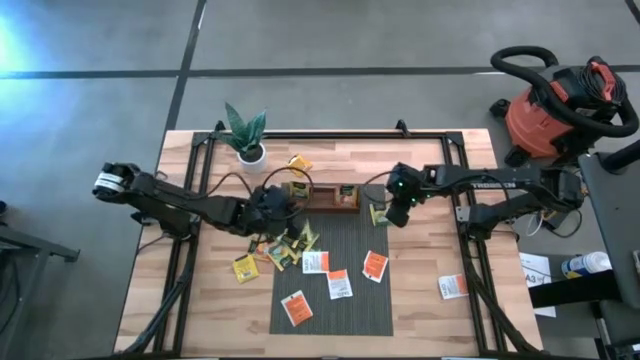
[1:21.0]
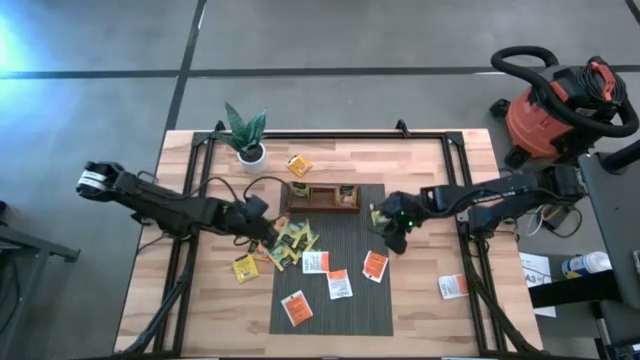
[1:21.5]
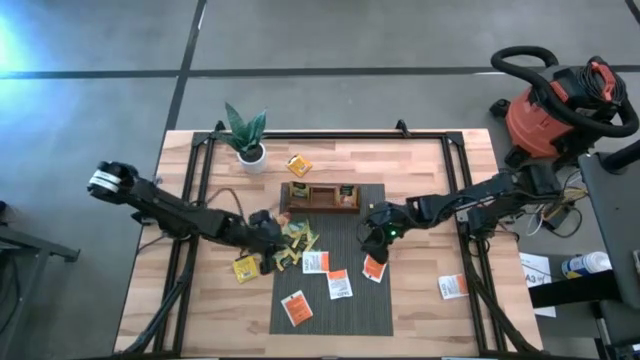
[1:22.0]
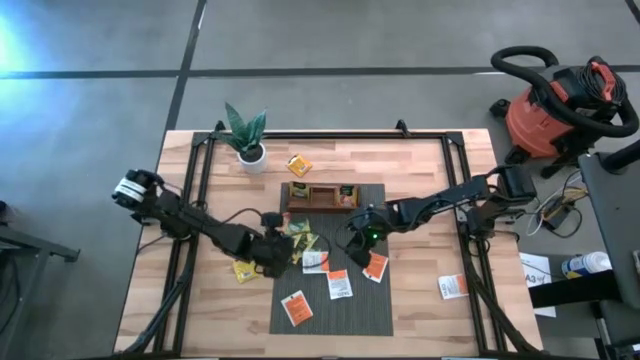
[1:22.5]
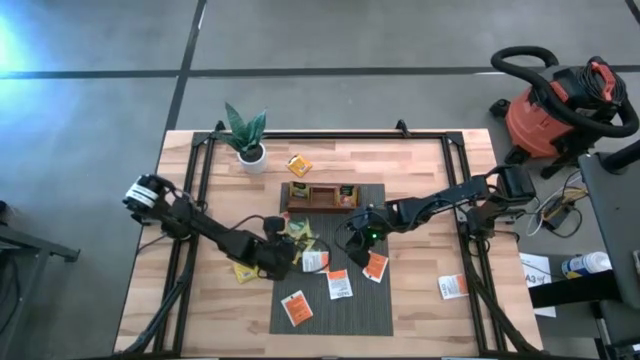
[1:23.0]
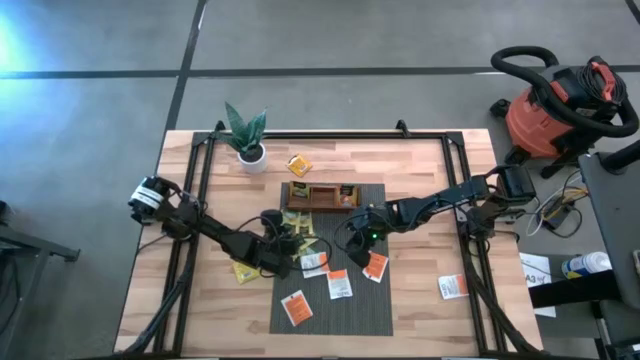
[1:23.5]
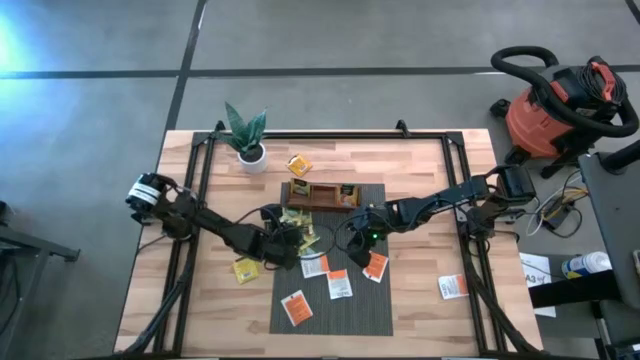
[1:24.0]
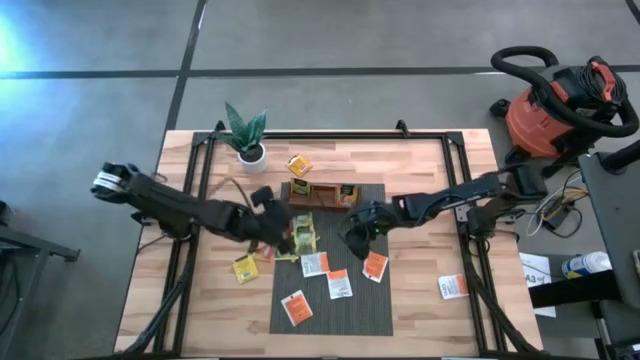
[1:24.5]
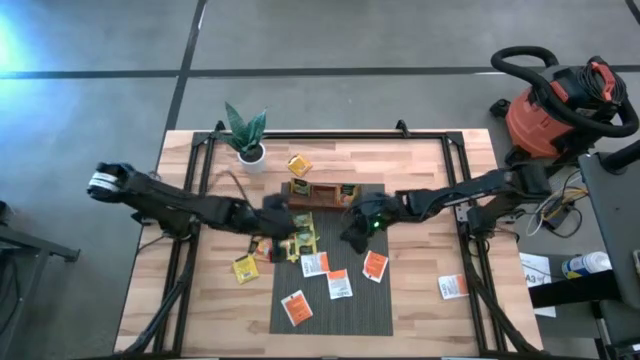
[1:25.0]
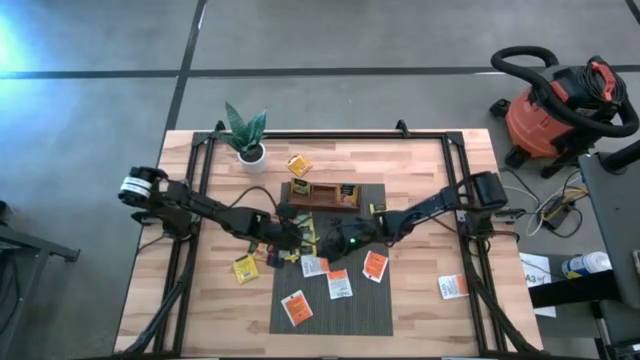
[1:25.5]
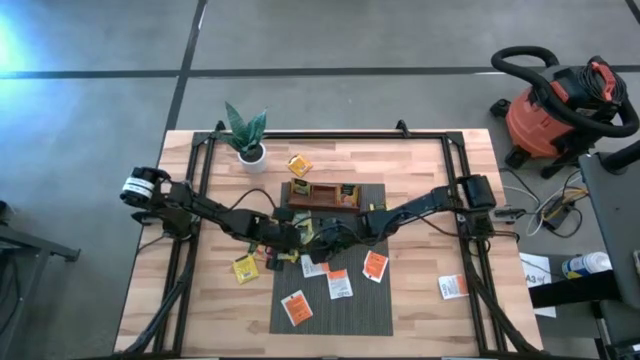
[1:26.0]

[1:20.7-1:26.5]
Task: Pick & Place Tea
Put the yellow tea bag into the left compartment of the wooden organizer

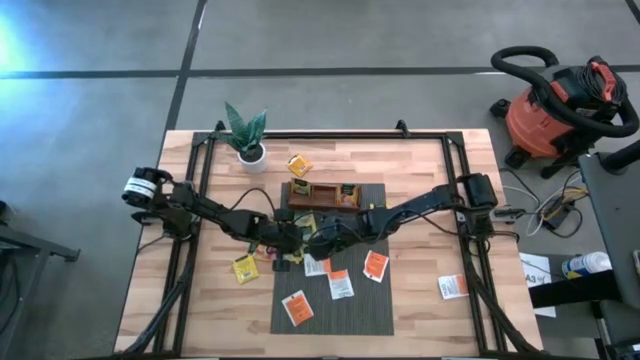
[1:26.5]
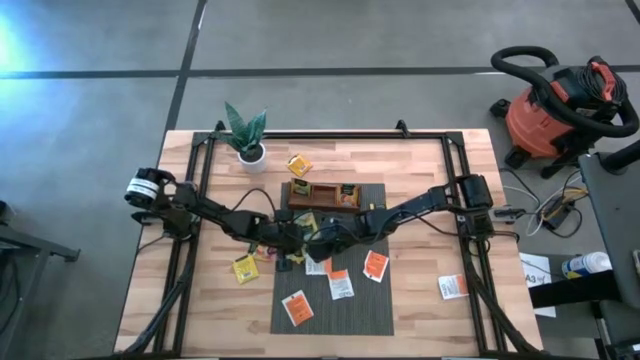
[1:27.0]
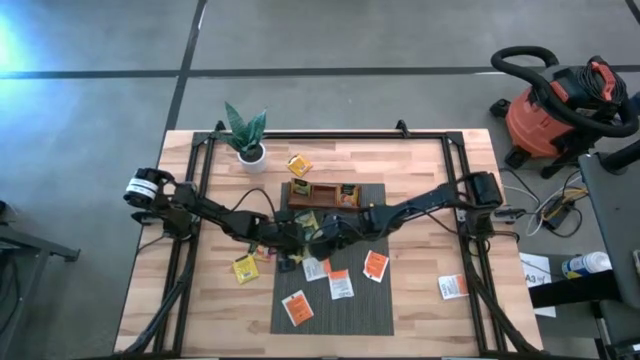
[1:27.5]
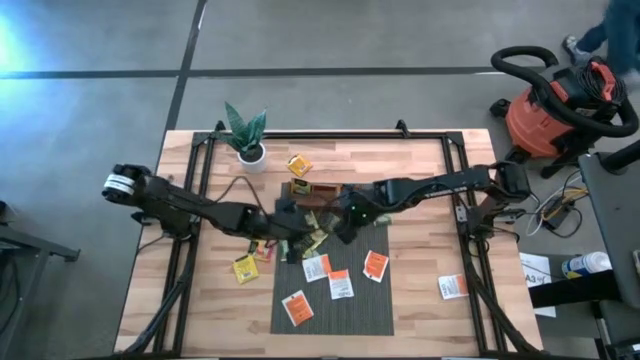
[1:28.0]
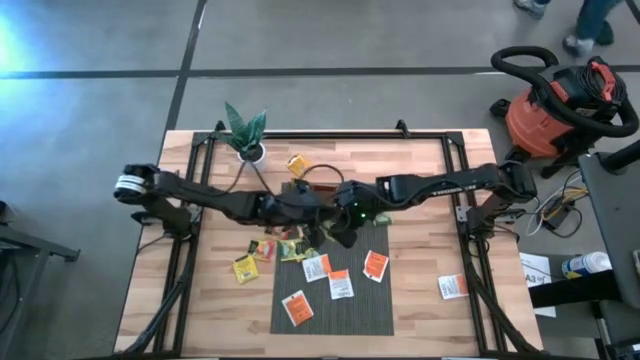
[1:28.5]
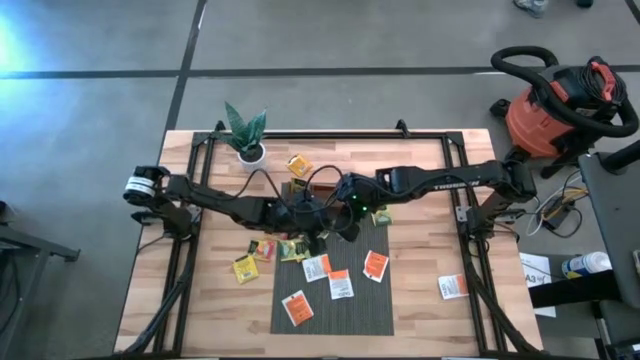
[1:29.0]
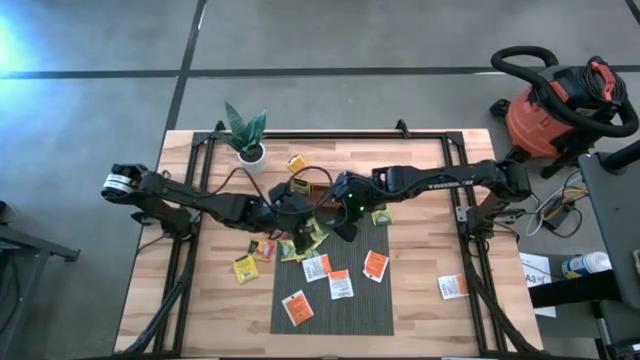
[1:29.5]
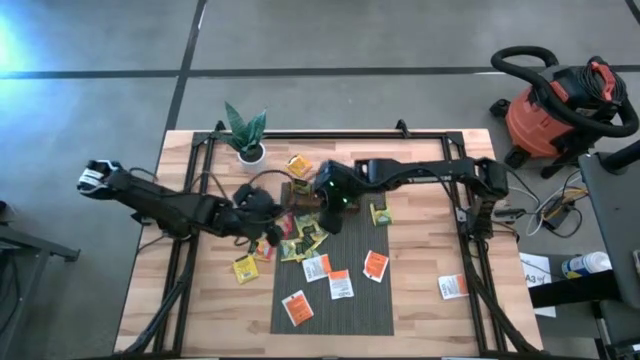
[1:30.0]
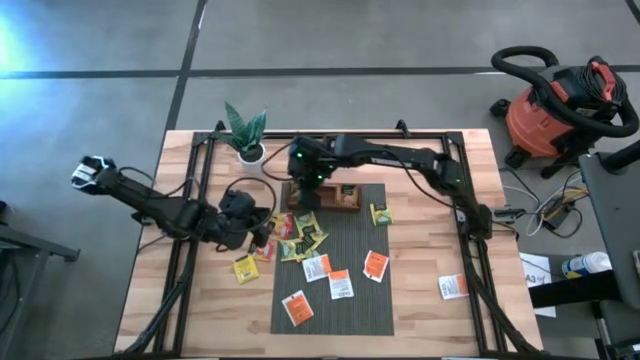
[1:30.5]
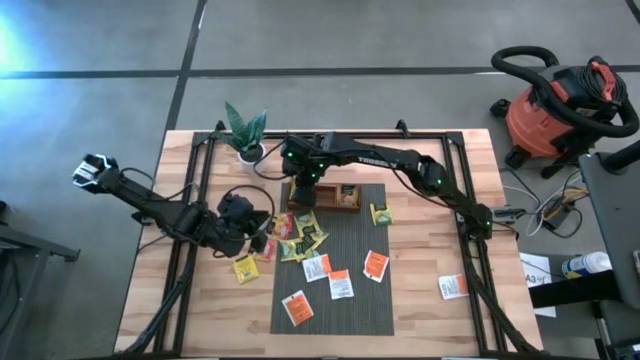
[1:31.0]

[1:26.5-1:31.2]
Put the yellow tea bag into the left compartment of the wooden organizer

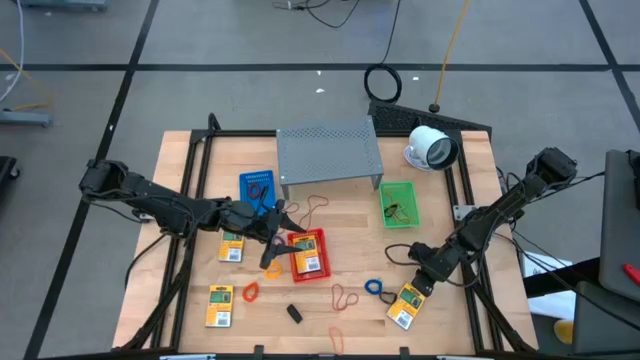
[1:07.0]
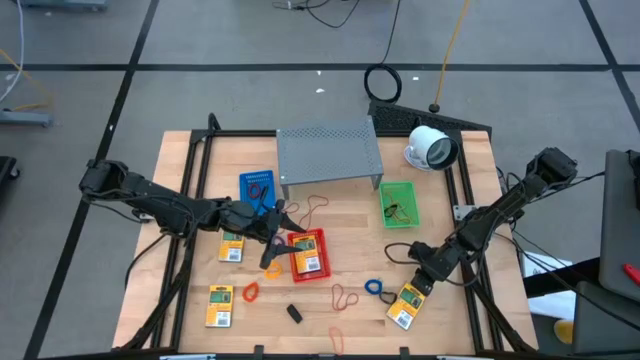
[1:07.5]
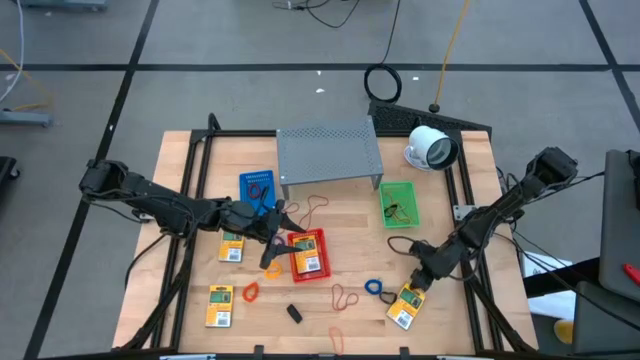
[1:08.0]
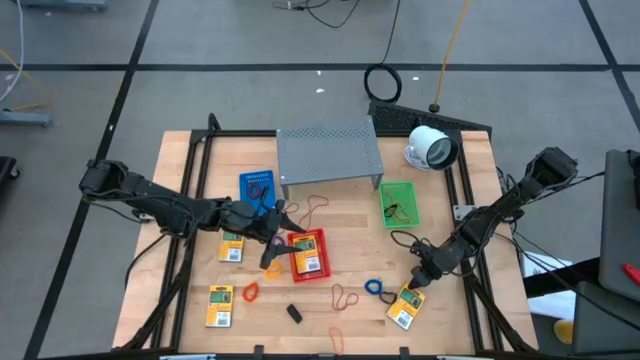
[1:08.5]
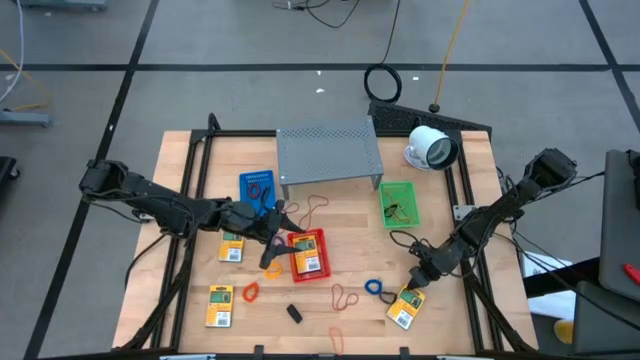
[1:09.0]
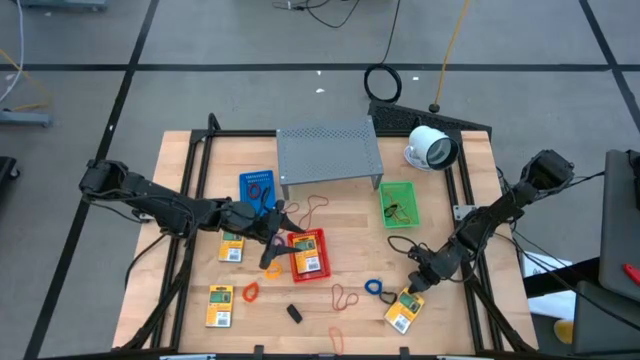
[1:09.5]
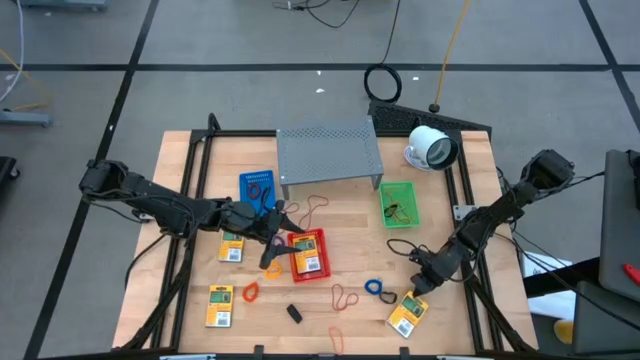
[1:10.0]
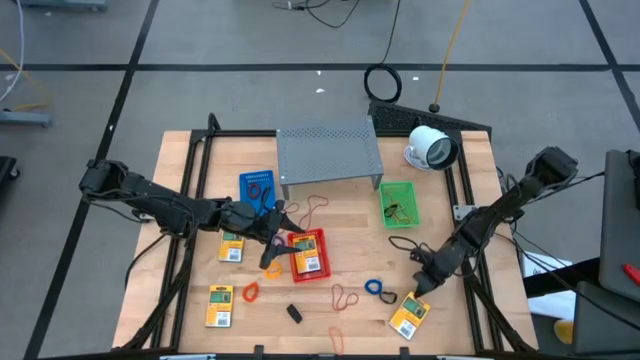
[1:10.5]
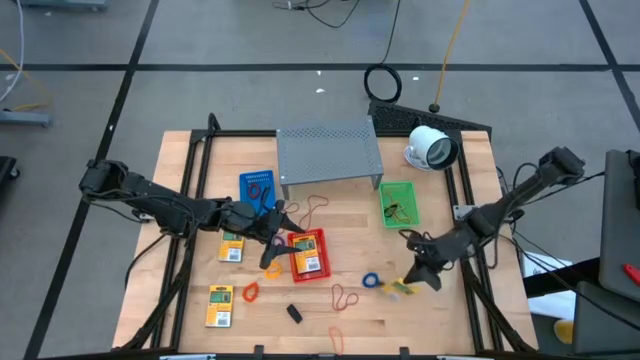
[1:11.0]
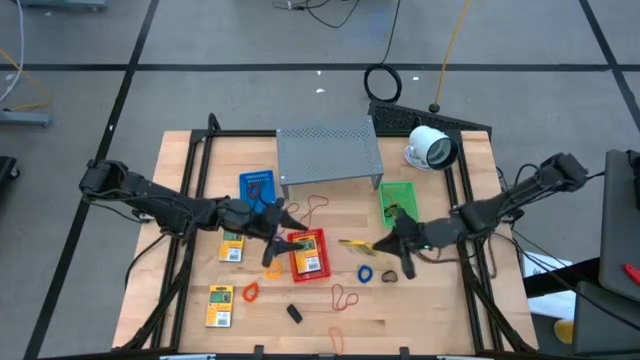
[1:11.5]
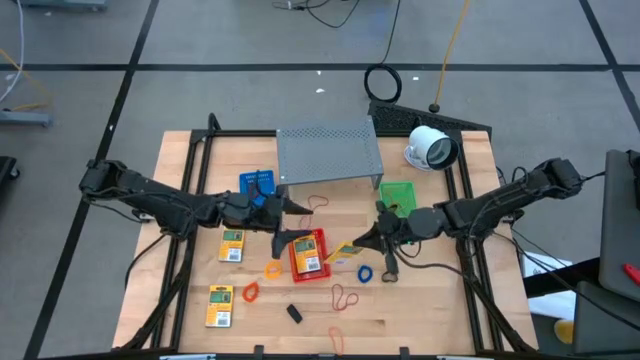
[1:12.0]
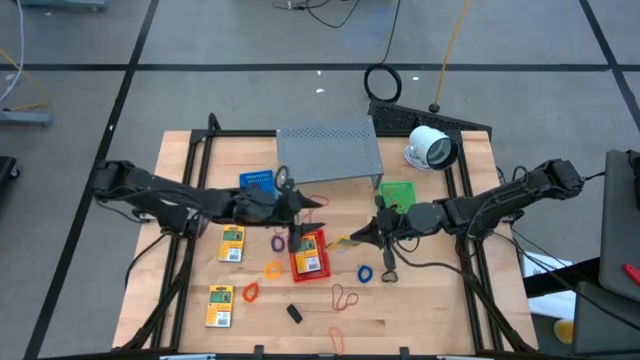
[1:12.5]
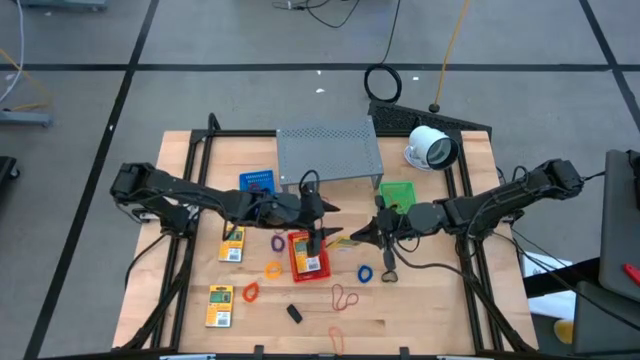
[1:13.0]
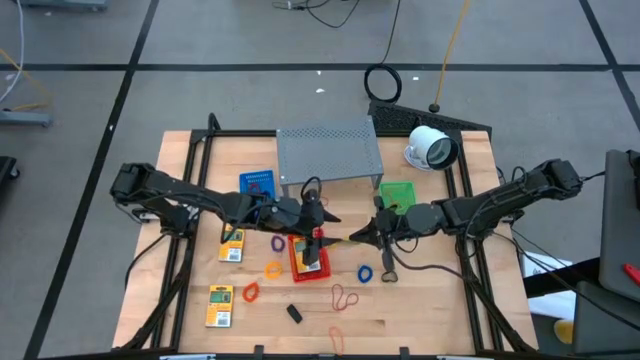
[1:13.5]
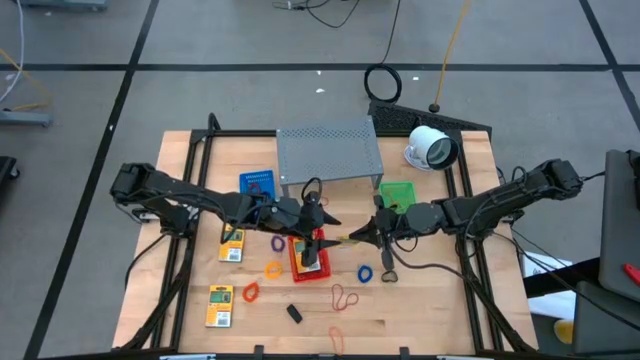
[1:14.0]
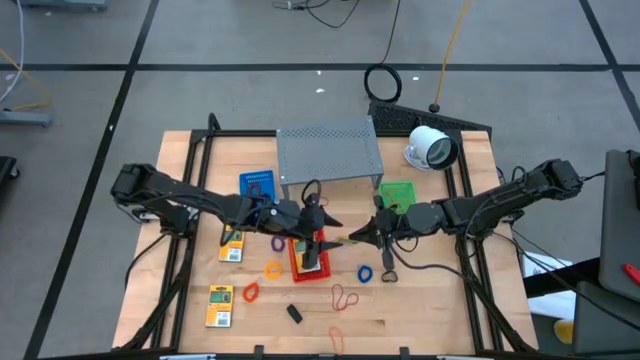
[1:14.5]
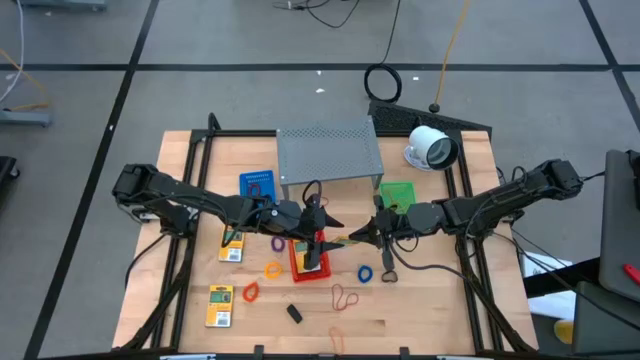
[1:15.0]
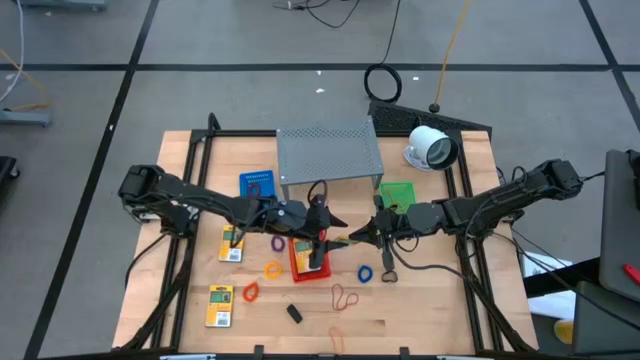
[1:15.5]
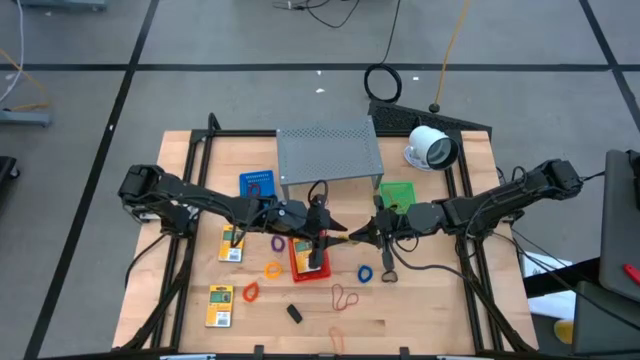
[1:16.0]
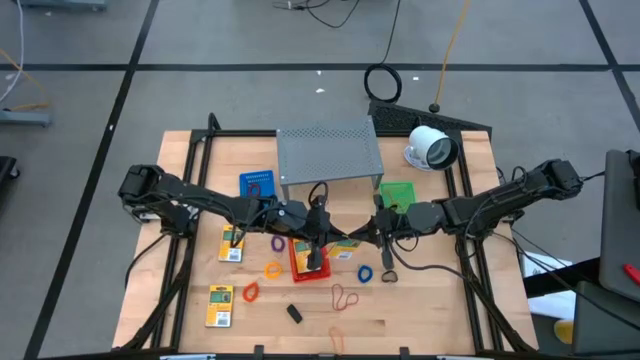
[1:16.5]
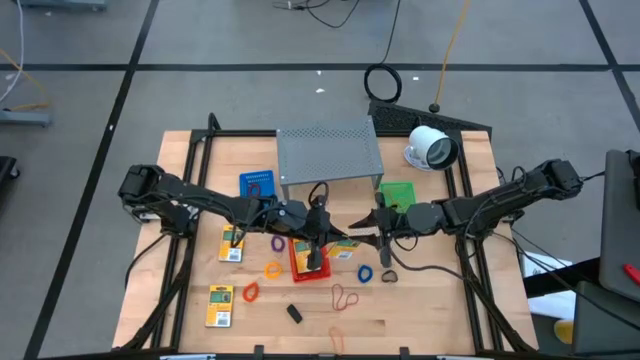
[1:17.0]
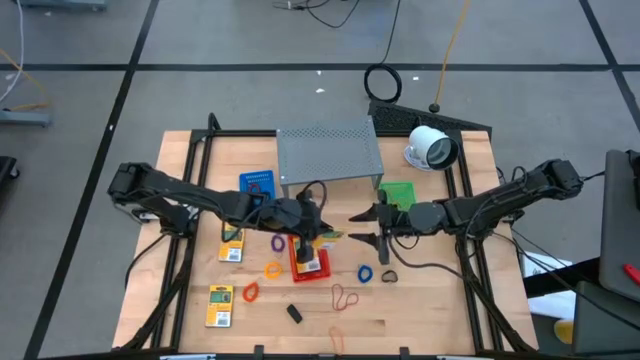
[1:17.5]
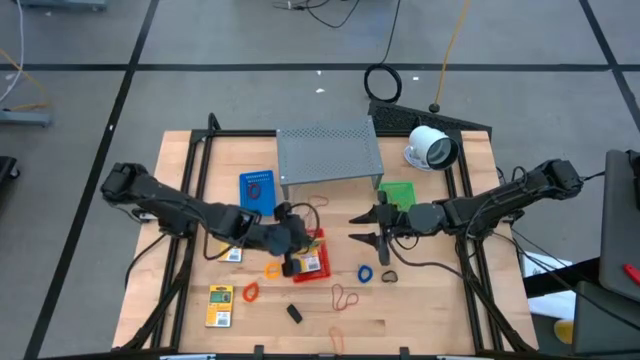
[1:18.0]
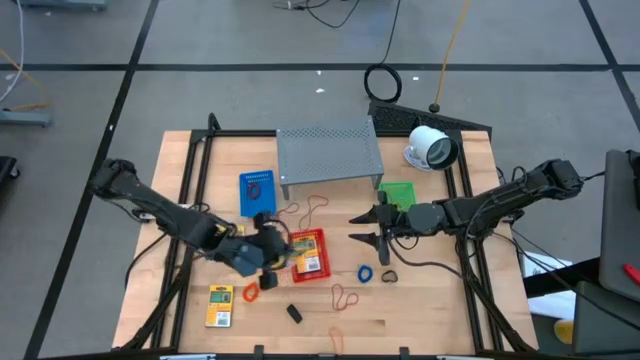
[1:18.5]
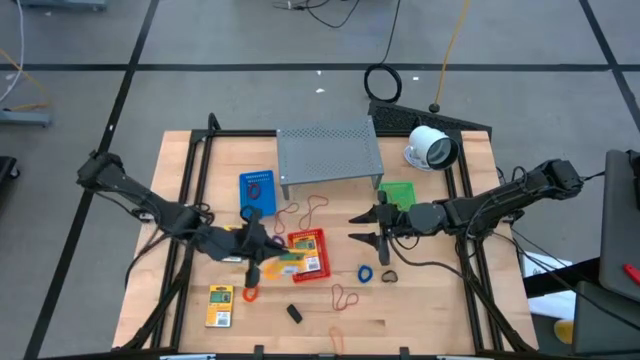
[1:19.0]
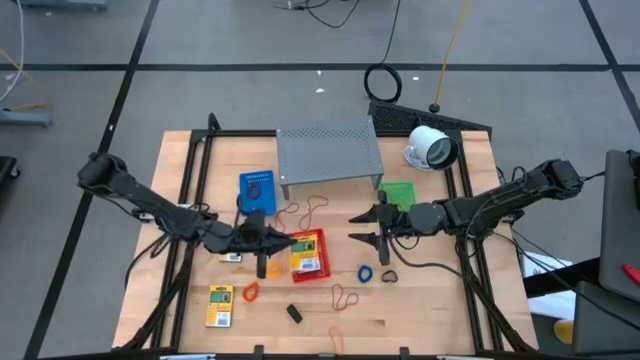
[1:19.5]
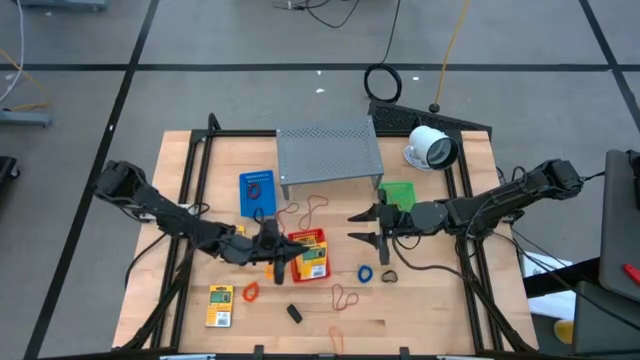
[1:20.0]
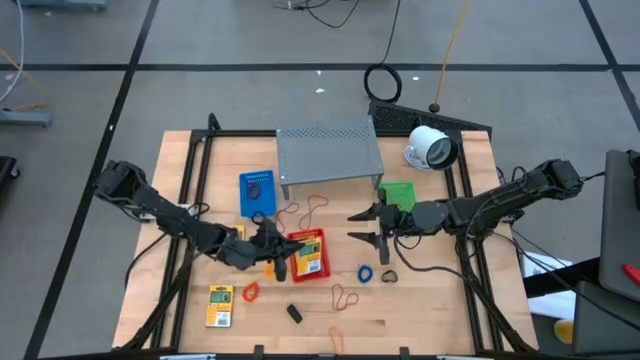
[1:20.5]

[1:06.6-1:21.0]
Task: Pick & Place Office Desk Supplies
Put the bottom right yellow crayon box into the red bin
